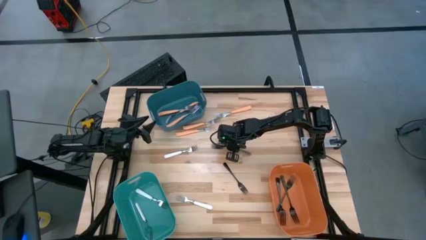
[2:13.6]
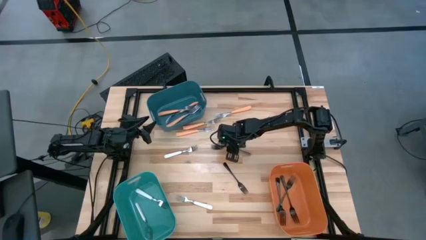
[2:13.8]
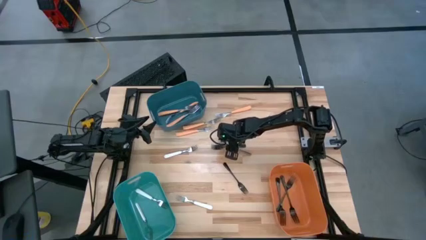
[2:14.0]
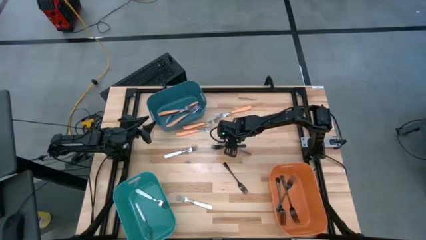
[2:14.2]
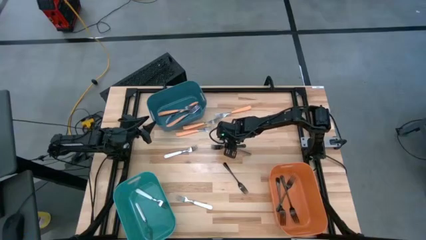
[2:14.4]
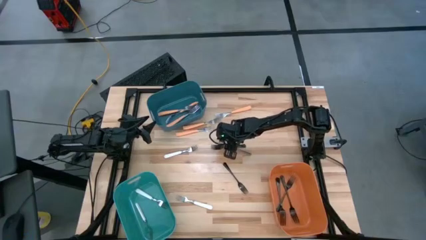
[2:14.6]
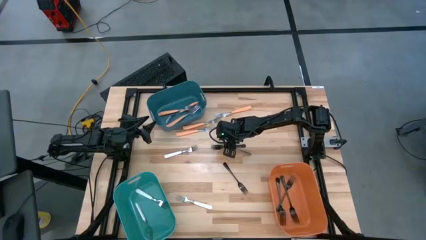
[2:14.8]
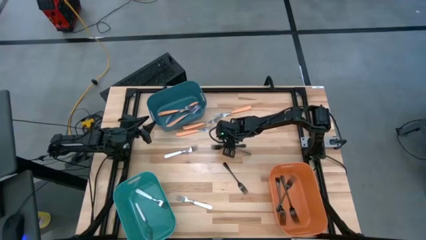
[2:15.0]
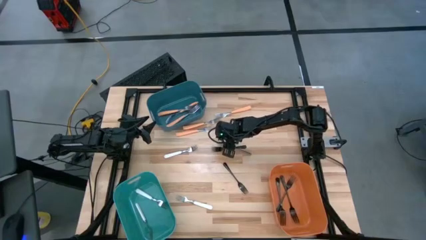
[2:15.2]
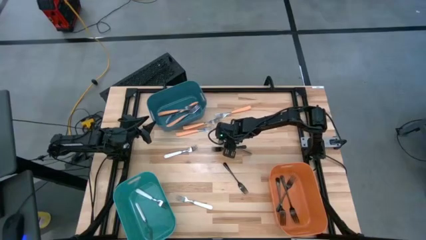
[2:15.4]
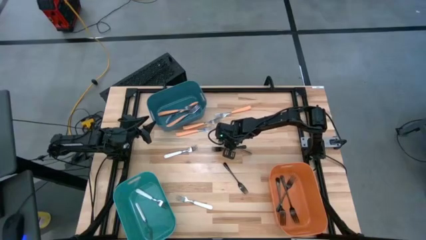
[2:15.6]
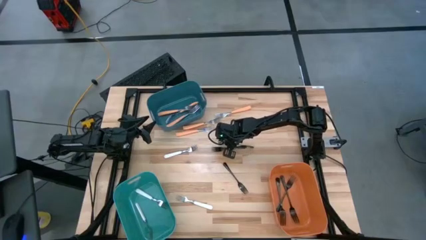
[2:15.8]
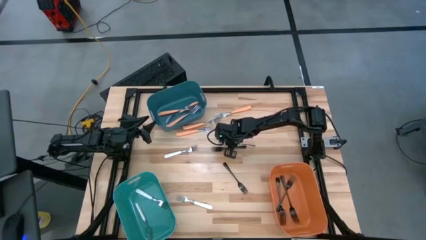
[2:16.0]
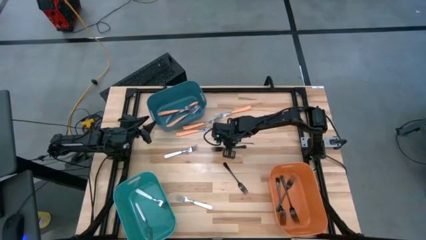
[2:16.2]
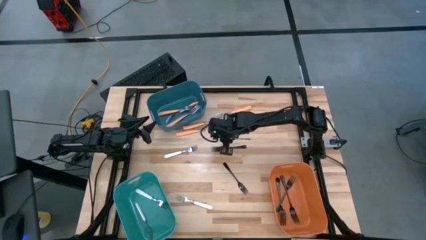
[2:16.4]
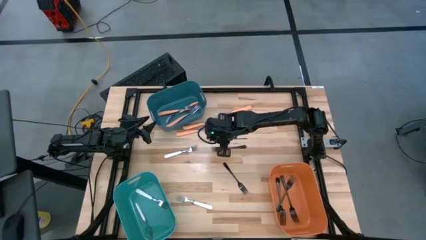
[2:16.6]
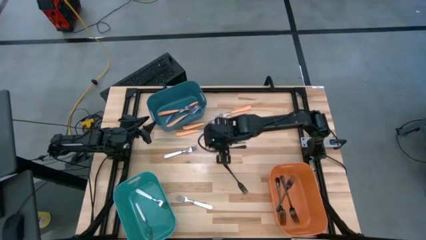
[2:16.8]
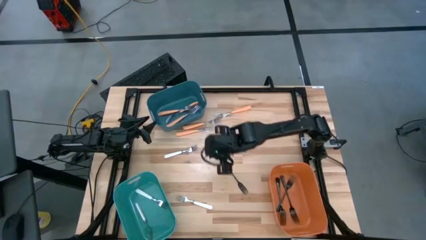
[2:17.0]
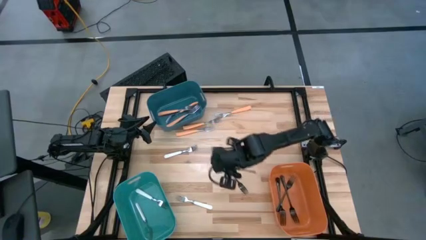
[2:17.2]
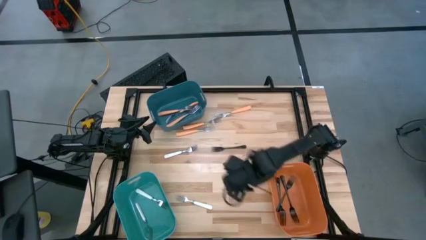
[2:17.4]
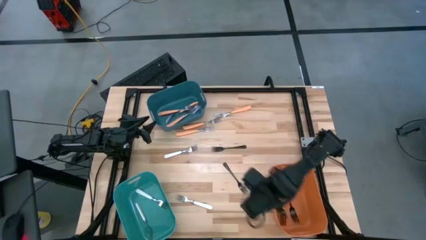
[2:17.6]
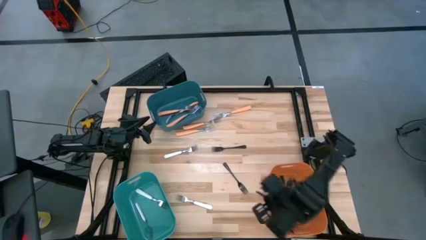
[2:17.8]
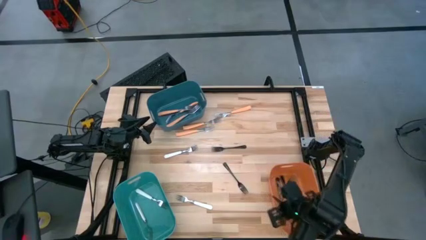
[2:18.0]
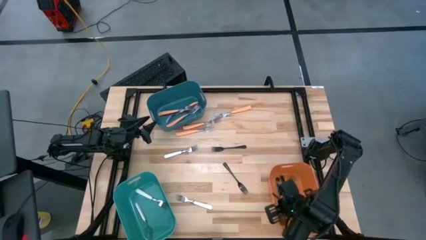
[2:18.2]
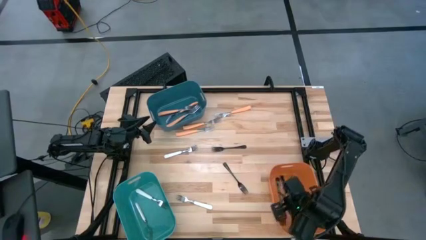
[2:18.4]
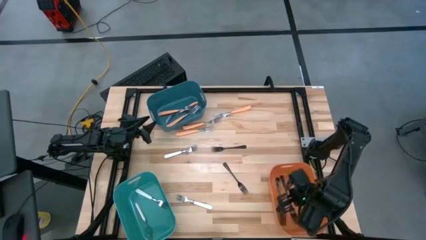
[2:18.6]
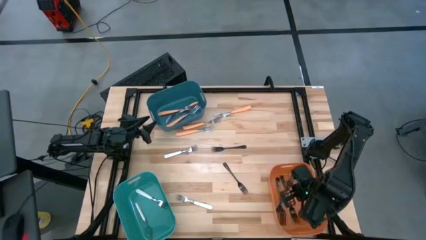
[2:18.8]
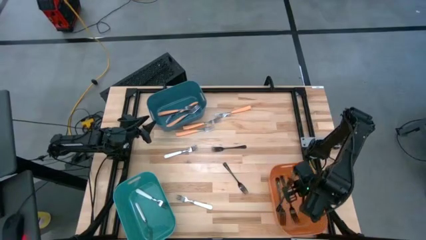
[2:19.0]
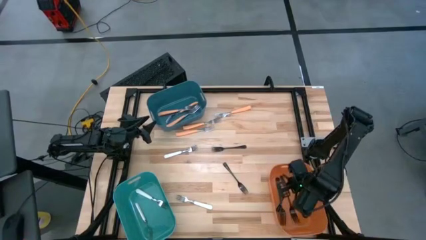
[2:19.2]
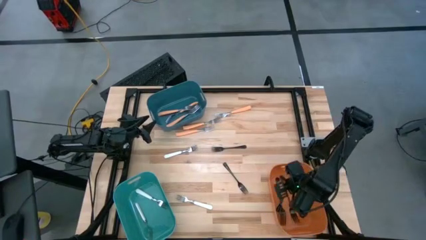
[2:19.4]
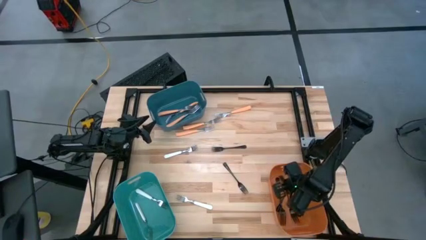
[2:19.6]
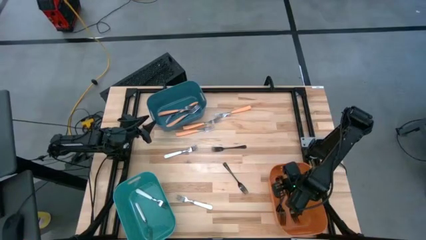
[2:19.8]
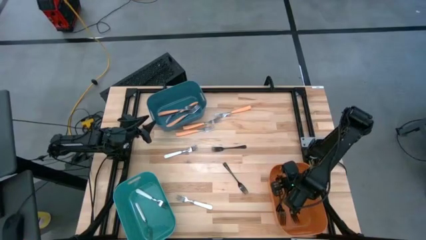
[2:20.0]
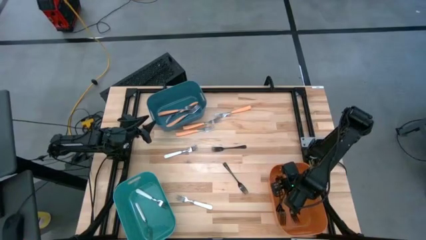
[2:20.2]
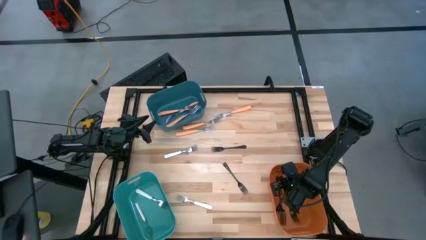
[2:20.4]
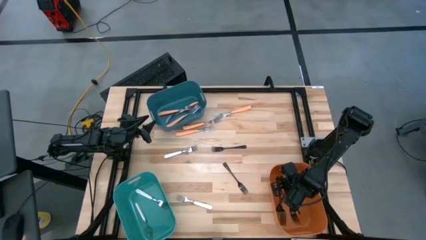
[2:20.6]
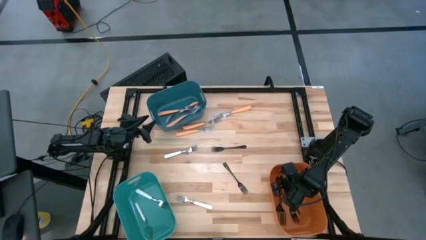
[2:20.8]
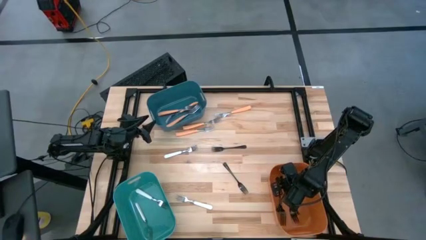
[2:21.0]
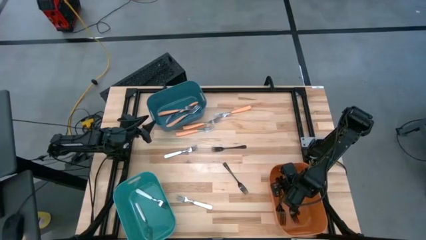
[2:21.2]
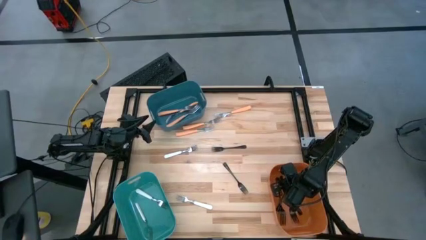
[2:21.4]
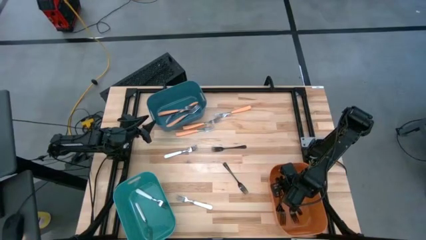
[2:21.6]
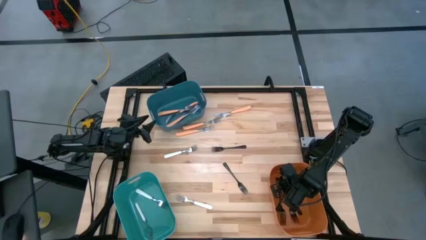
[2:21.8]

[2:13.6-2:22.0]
Task: Sort silverware by color (type)
Put the black fork into the orange bin

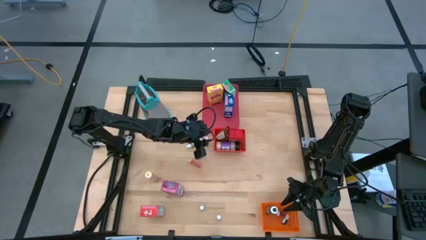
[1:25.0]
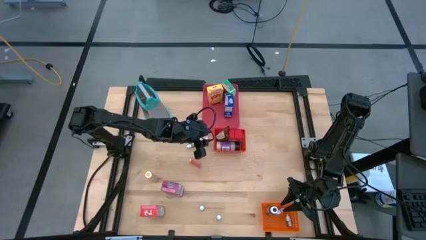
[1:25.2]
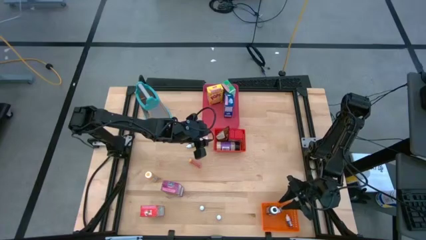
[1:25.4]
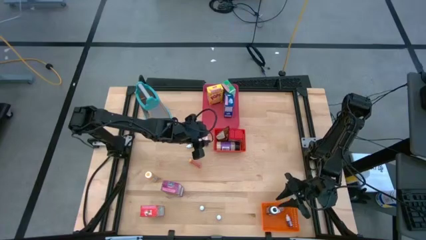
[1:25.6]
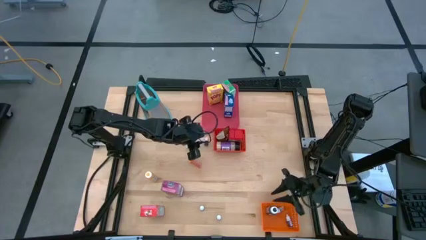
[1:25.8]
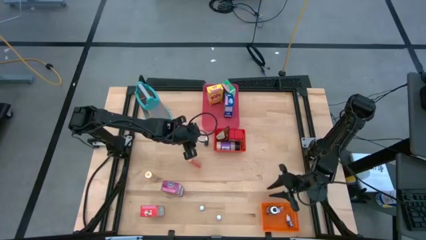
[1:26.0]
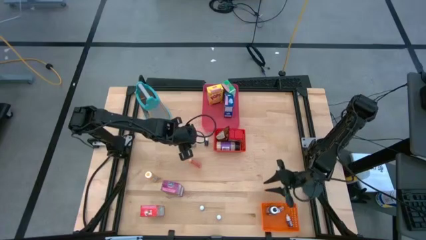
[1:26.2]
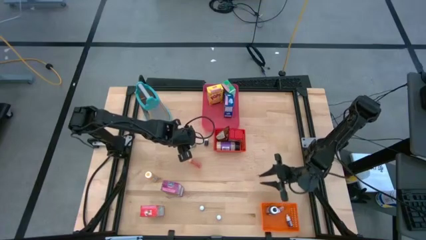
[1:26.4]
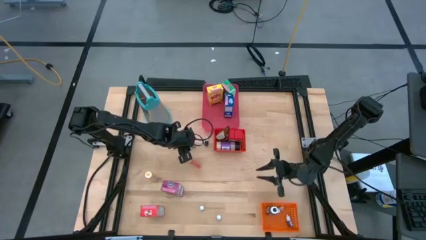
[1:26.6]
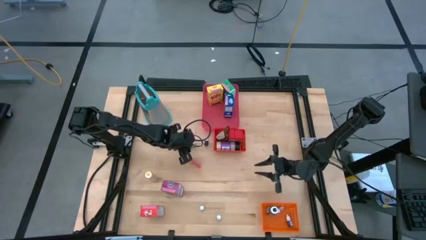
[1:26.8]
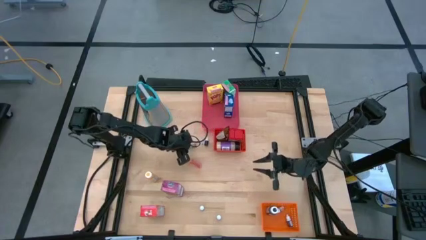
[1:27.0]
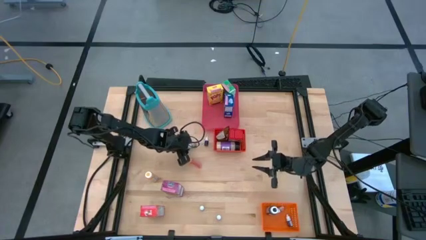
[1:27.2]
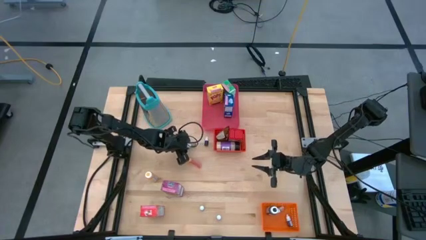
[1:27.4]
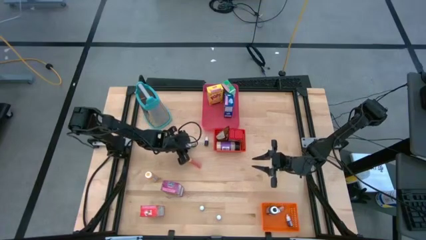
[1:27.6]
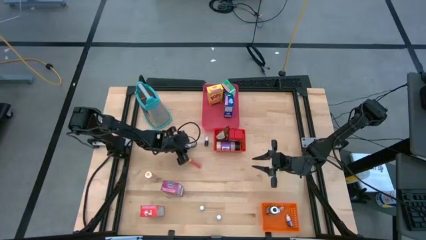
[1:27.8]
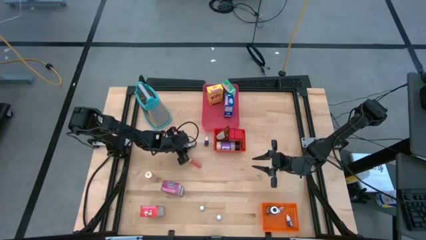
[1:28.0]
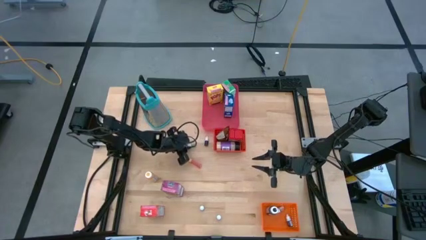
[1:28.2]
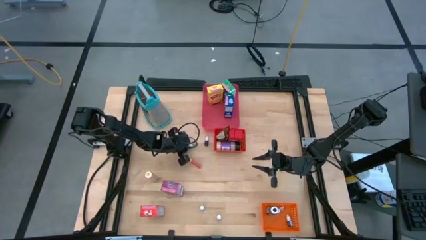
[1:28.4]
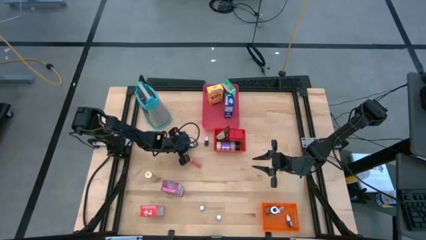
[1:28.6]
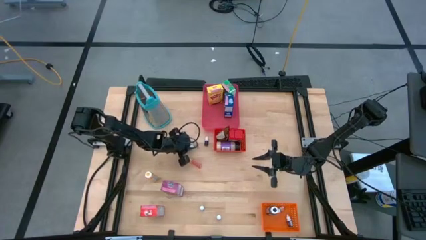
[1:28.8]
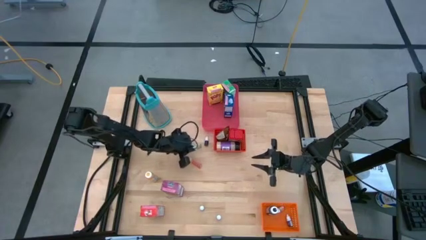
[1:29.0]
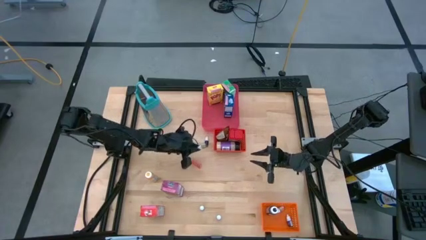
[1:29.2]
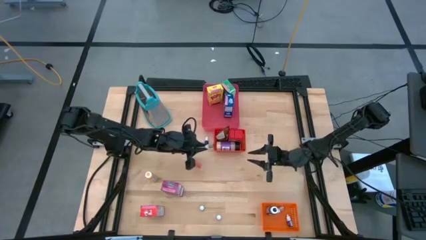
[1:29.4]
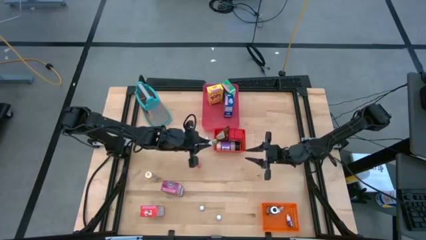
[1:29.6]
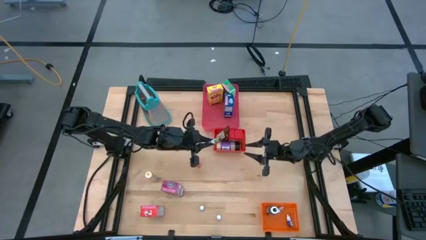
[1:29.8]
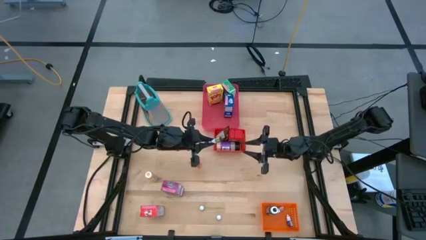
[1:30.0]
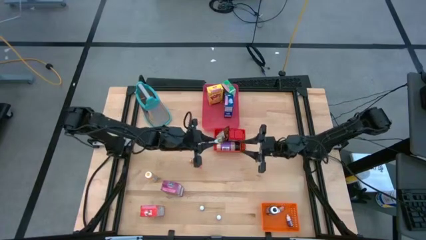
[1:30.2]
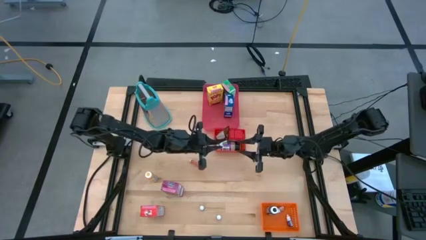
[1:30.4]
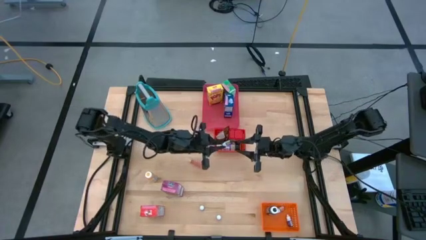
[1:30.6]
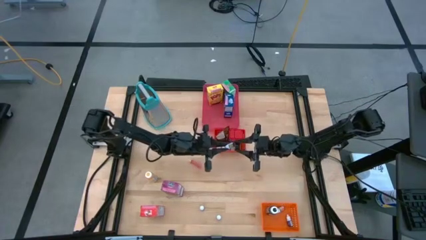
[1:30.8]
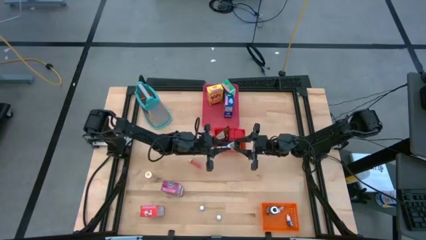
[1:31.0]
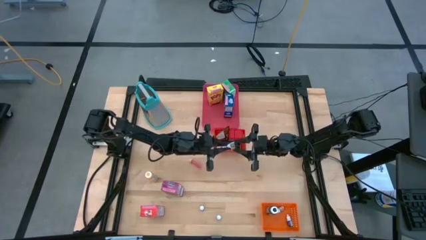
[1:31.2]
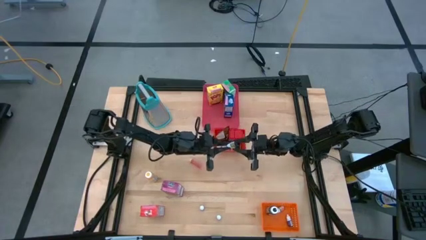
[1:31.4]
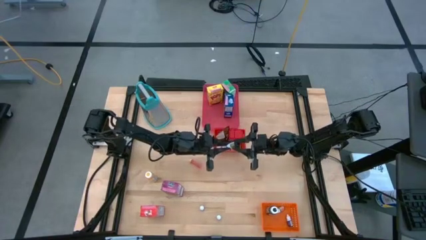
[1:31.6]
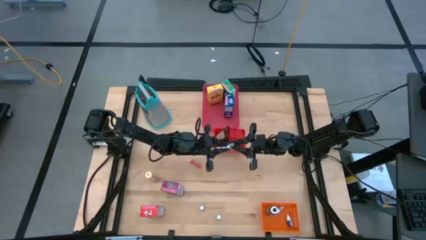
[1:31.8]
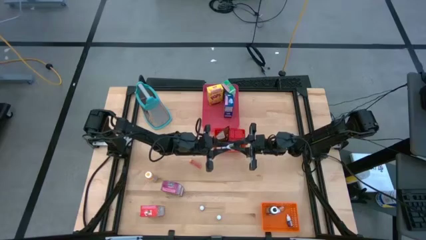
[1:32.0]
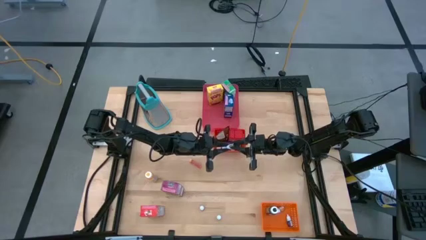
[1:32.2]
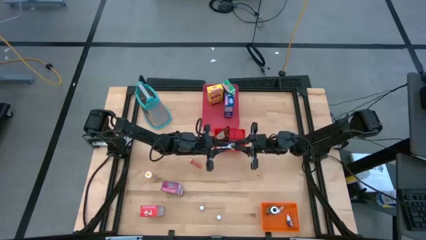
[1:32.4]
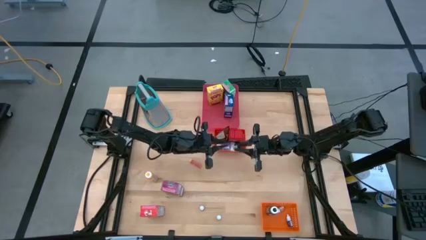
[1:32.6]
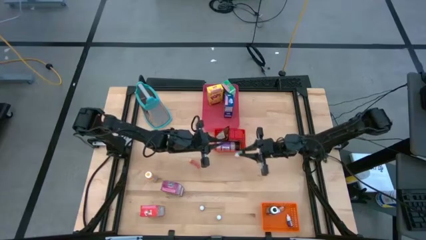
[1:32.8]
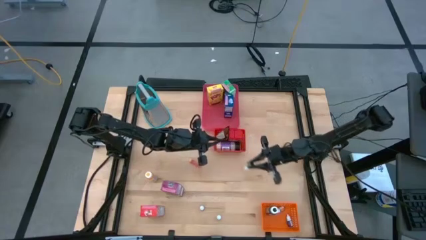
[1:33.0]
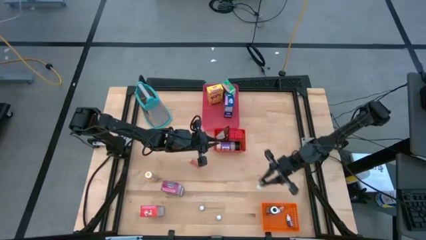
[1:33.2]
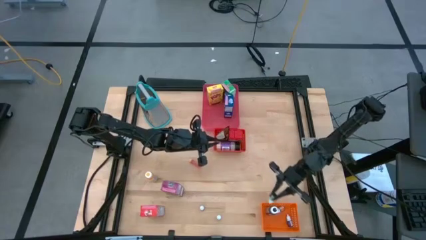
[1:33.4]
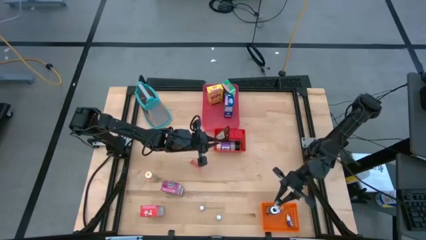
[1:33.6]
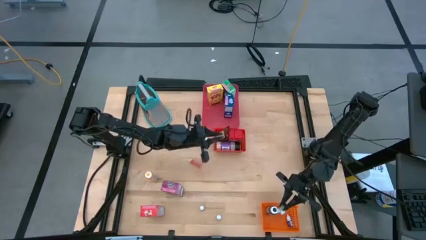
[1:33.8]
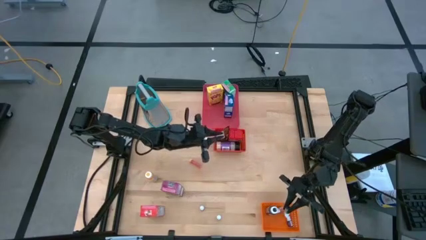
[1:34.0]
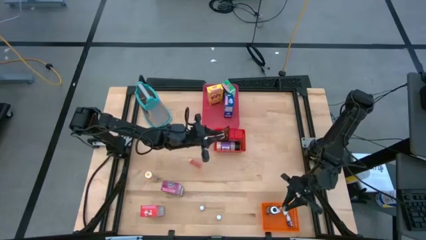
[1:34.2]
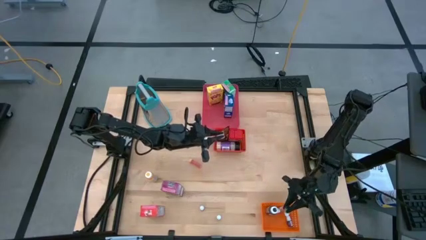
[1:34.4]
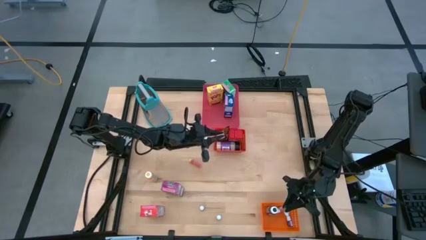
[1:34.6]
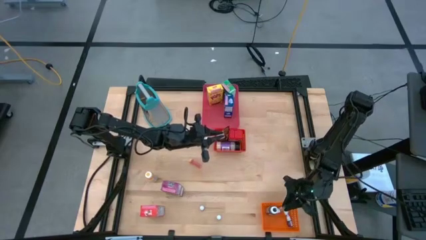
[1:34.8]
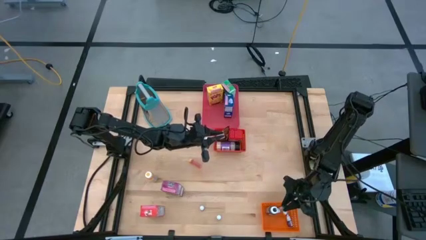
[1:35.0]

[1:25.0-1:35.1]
Task: Pick & Place Kitchen Items
Put the green food coloring bottle into the orange bin
